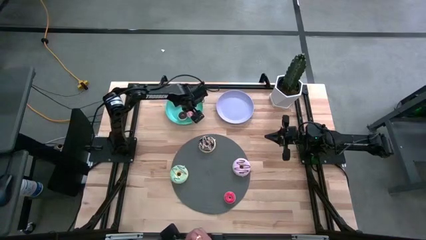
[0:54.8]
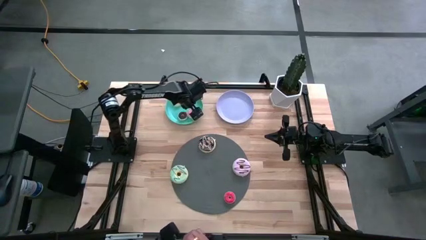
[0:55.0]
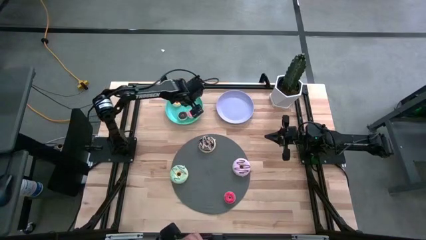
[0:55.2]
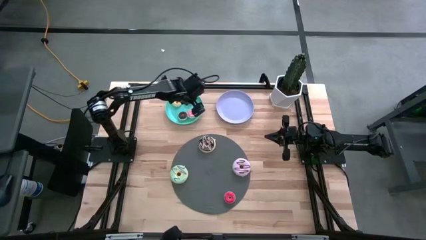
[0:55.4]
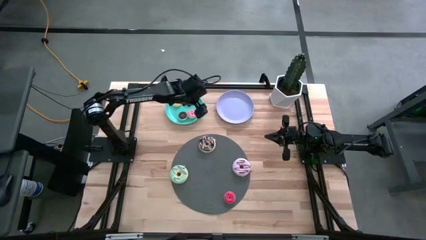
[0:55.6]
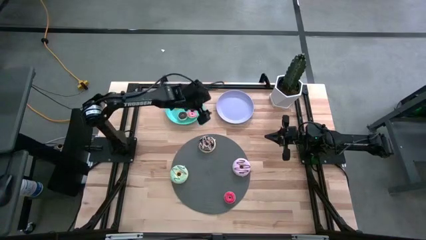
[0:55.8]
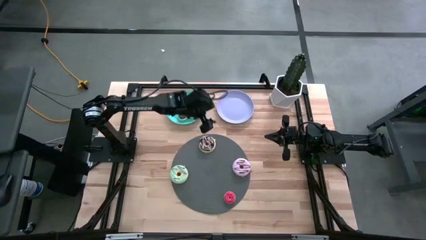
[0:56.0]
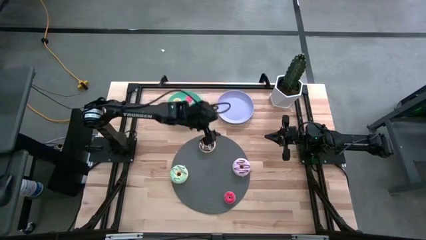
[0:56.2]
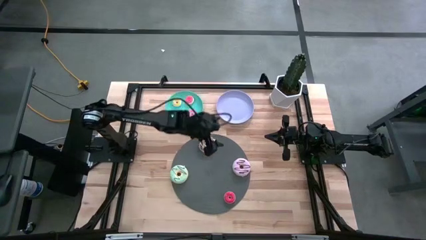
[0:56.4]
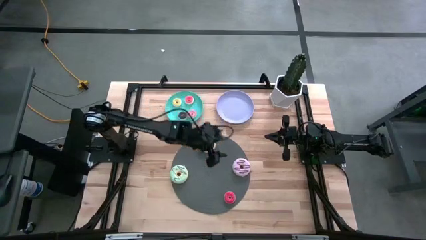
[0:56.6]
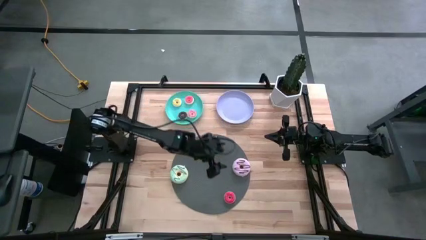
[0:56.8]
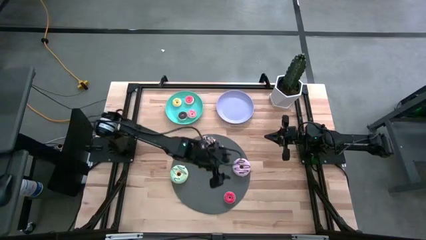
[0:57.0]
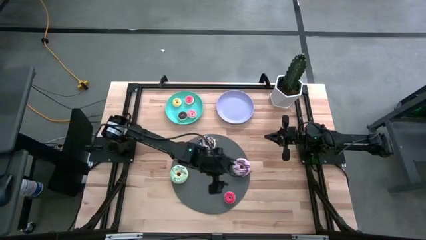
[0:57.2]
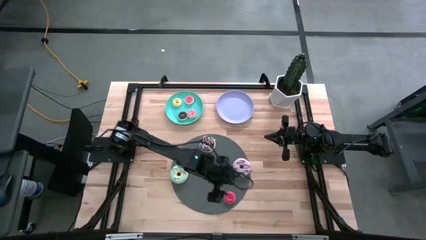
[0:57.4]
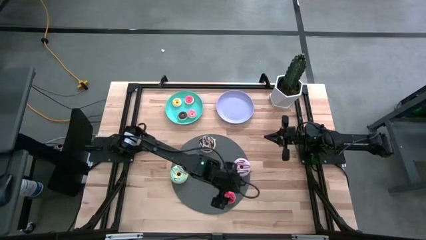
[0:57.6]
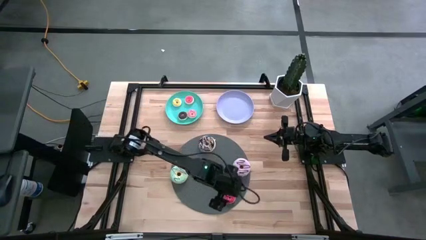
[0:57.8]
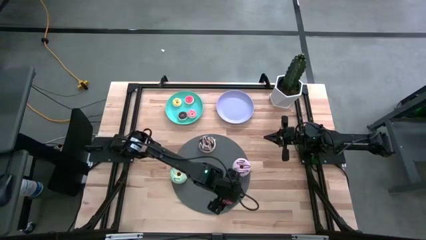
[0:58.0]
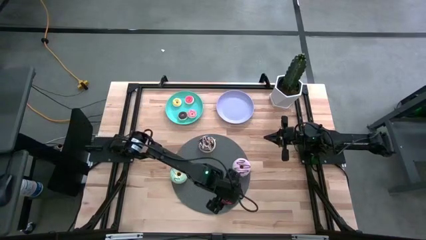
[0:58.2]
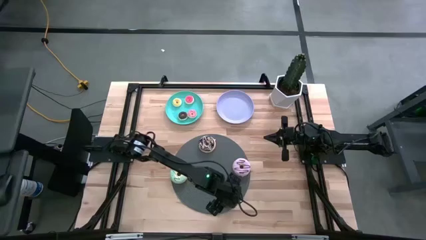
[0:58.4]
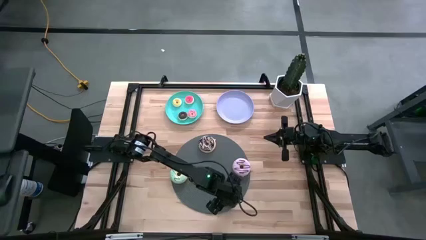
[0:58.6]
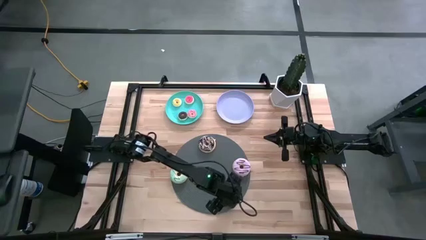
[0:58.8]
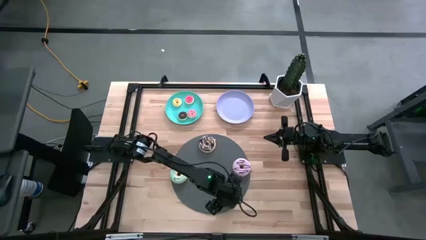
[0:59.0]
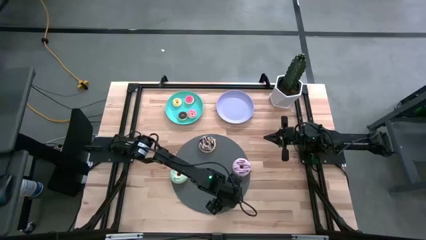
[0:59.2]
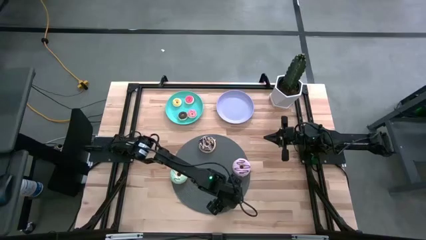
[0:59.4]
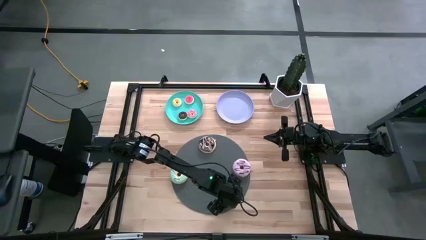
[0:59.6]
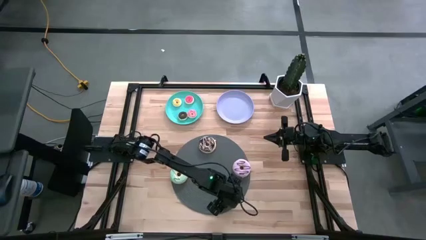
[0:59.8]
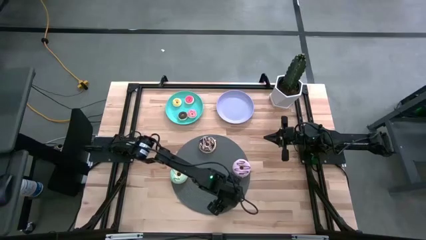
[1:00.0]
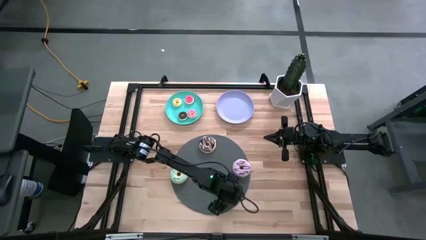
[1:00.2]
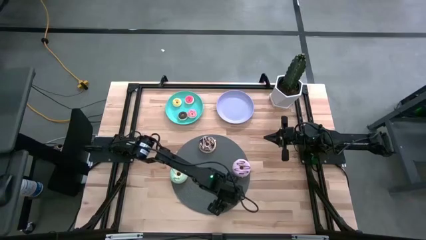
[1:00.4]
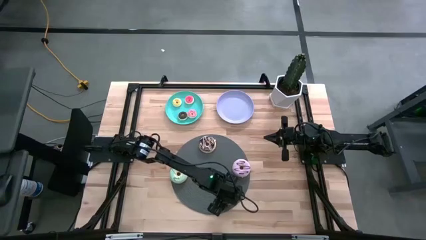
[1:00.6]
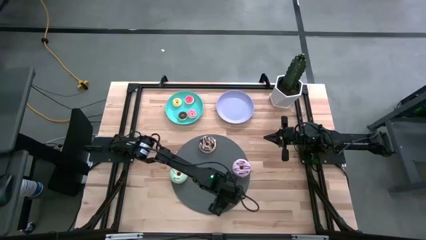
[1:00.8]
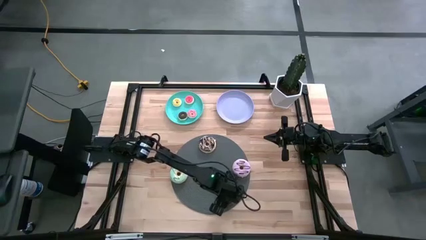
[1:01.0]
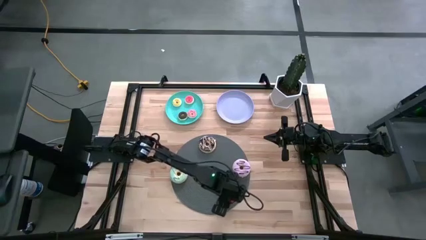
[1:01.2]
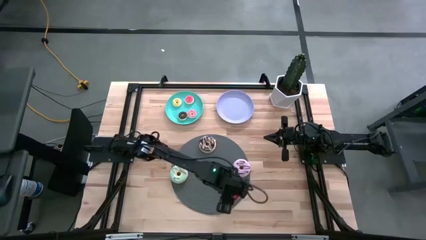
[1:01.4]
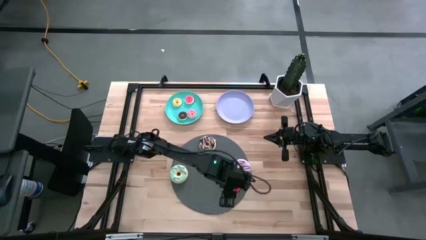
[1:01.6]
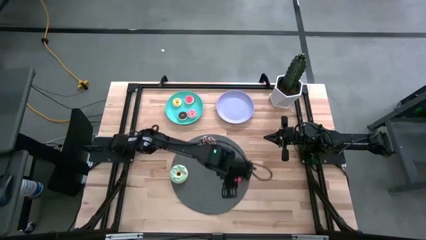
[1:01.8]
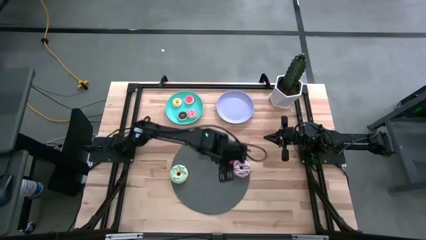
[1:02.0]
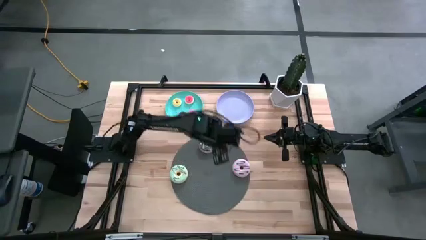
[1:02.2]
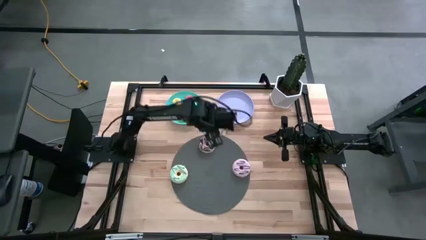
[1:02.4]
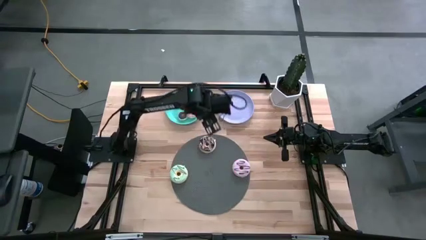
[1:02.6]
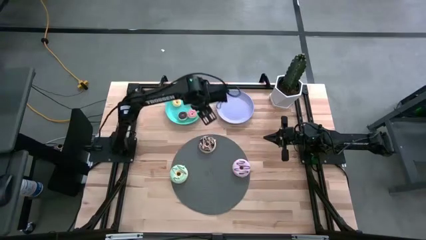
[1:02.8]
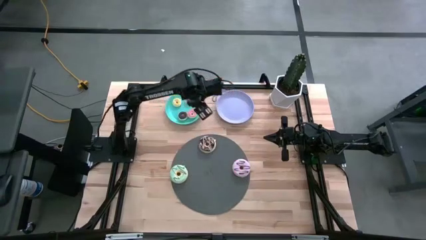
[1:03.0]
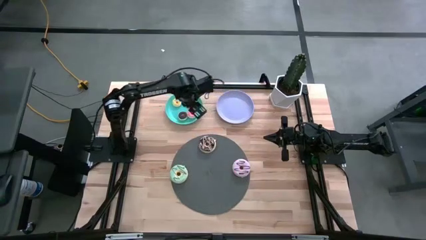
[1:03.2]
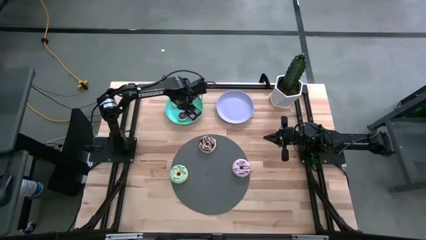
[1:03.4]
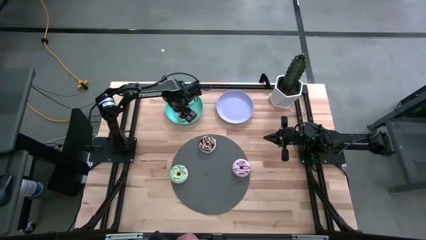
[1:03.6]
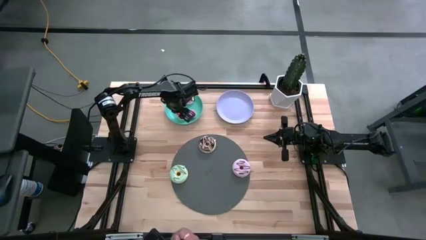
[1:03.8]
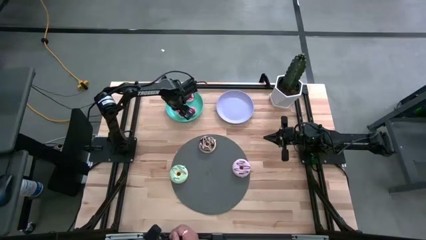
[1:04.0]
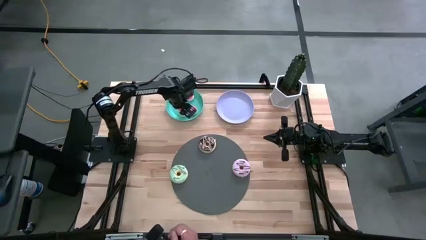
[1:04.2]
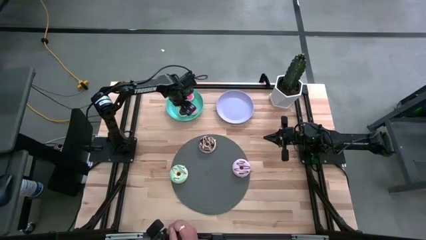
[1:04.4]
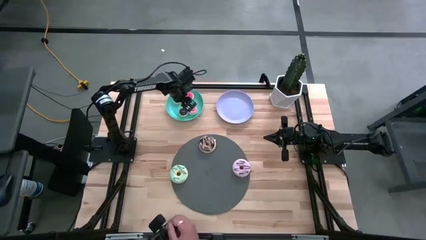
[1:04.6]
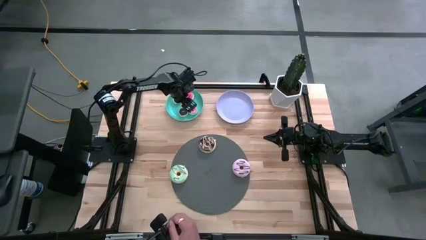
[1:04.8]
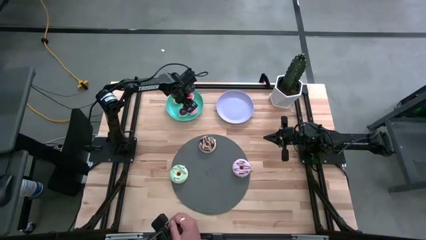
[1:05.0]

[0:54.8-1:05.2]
Task: Pick & Place donuts
Put the small red donut on the green plate

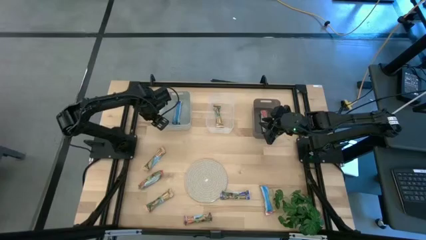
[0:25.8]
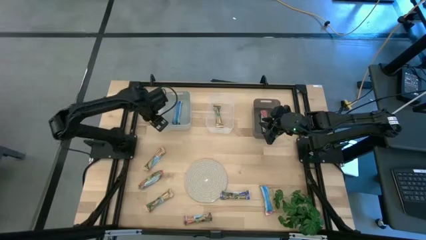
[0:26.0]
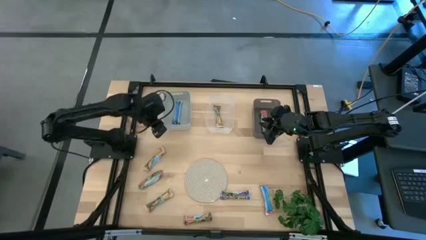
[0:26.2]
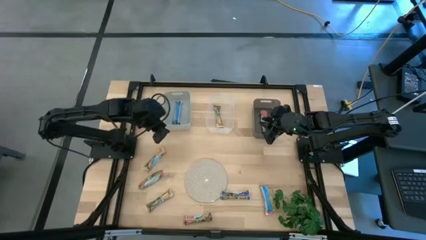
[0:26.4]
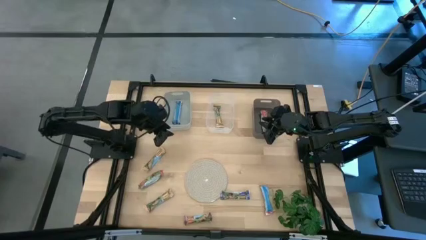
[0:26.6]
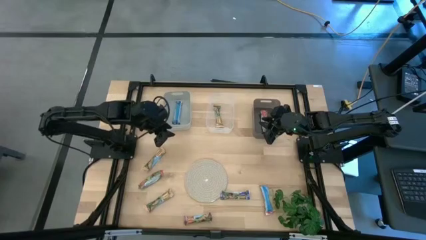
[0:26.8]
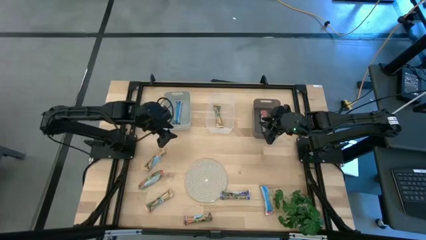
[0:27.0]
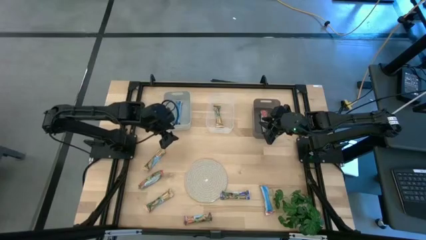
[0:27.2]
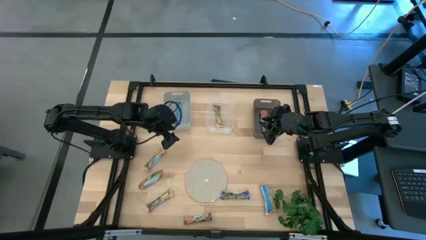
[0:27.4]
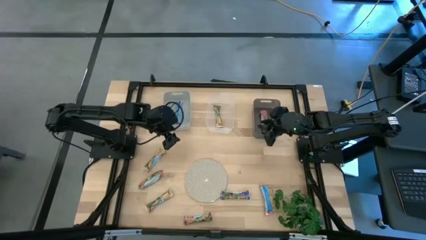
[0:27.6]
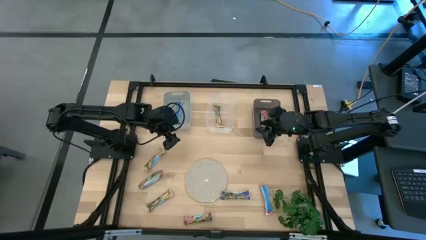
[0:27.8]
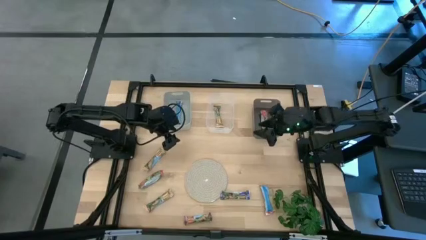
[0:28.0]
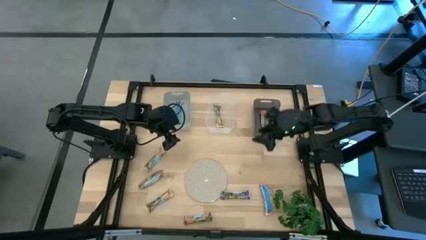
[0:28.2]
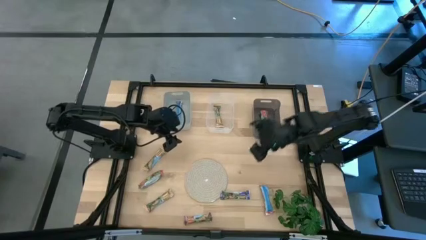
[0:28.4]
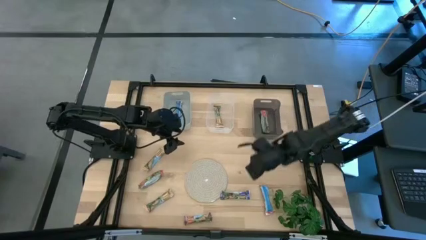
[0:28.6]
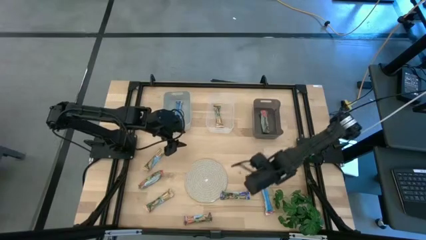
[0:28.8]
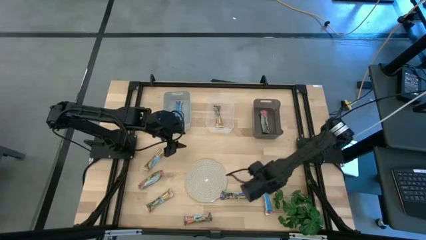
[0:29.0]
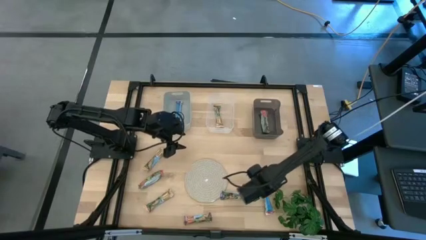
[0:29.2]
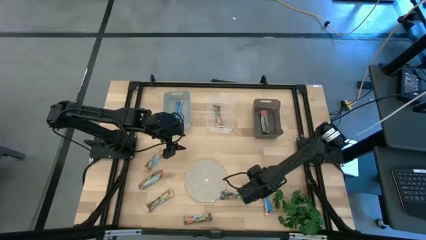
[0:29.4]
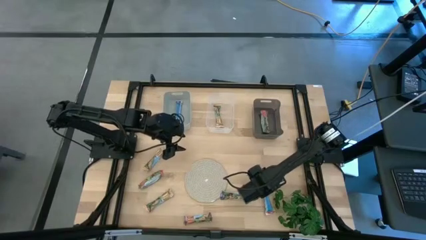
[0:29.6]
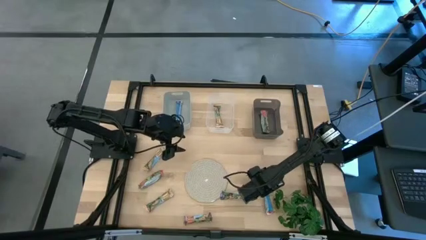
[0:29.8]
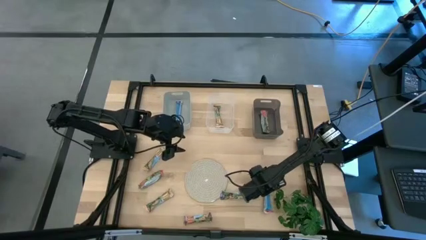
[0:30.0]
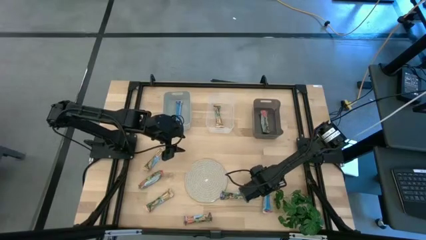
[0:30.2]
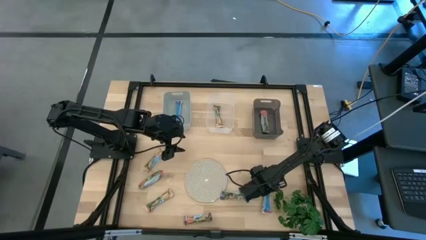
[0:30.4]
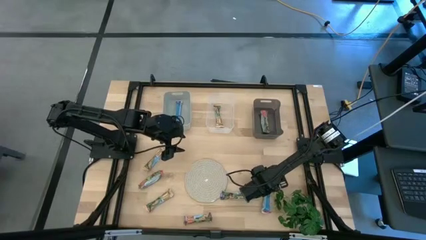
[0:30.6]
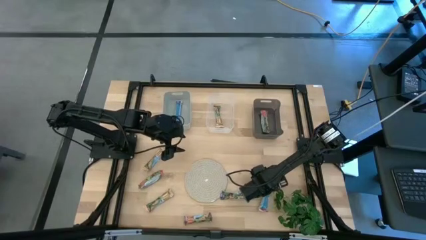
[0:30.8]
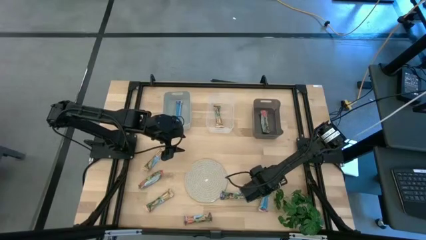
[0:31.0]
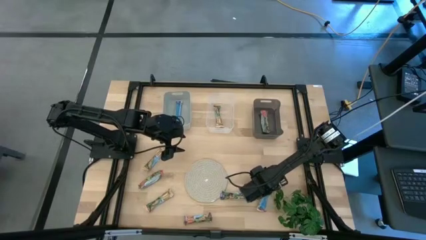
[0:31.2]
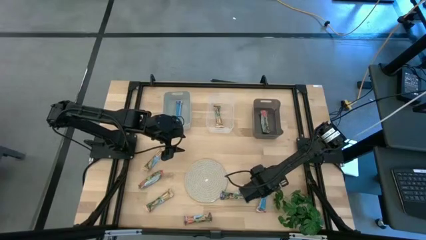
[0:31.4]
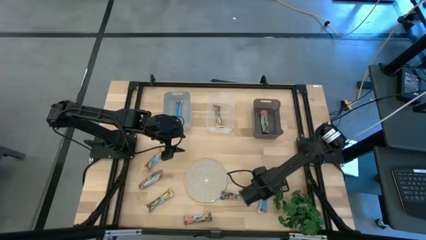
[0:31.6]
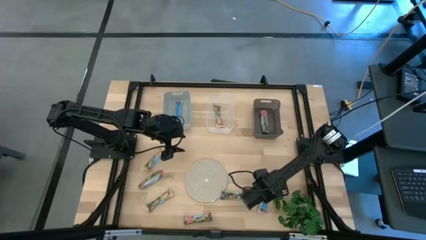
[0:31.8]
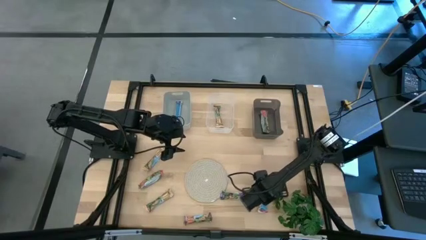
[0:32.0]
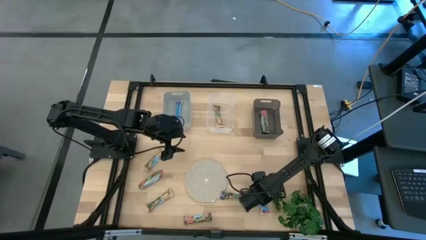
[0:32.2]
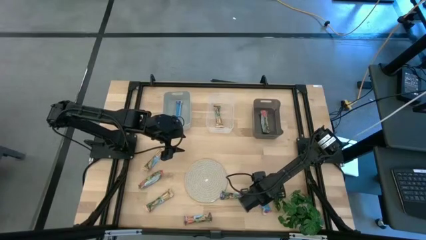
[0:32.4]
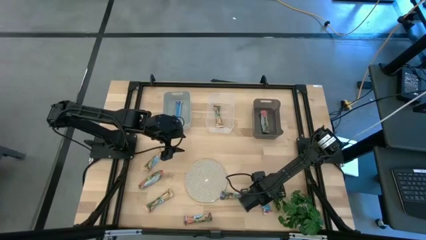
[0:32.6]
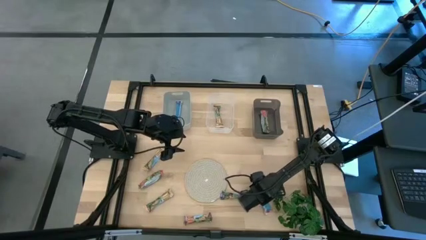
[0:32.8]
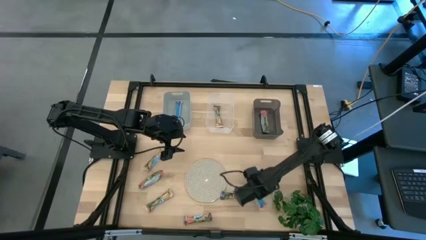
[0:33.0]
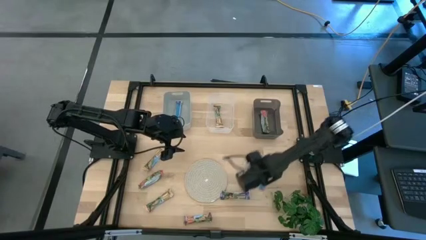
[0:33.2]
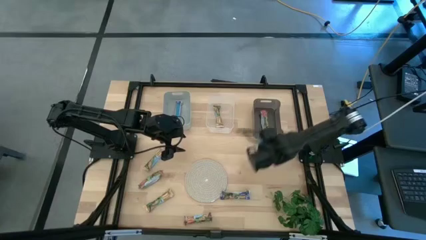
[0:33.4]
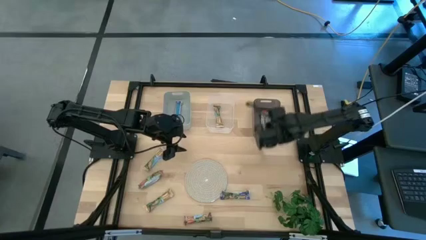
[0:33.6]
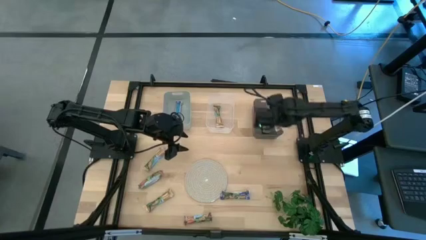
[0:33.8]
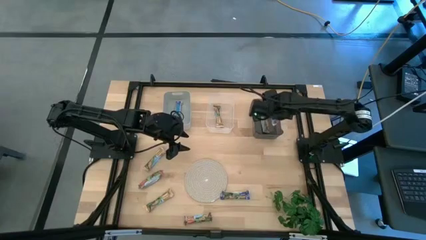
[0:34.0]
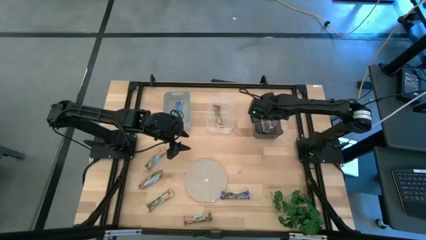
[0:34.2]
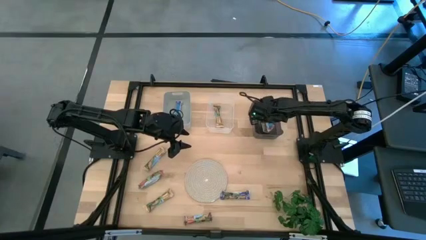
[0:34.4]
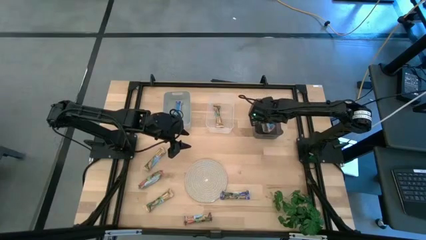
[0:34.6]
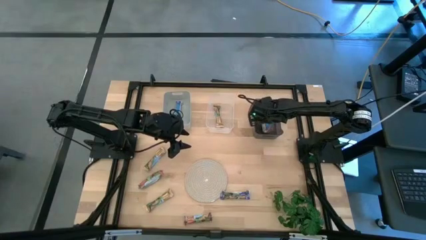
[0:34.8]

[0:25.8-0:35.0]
Task: Pick and place Granola Bars by type
Put the red granola bar into the black bin
